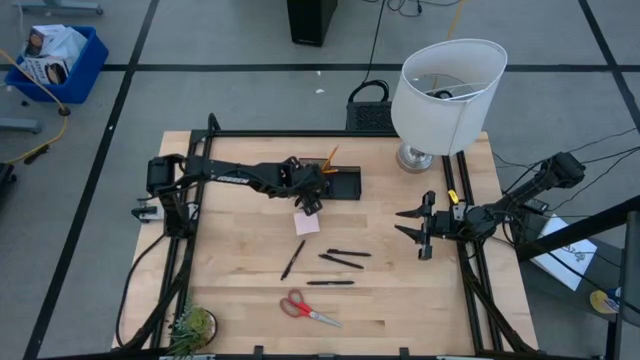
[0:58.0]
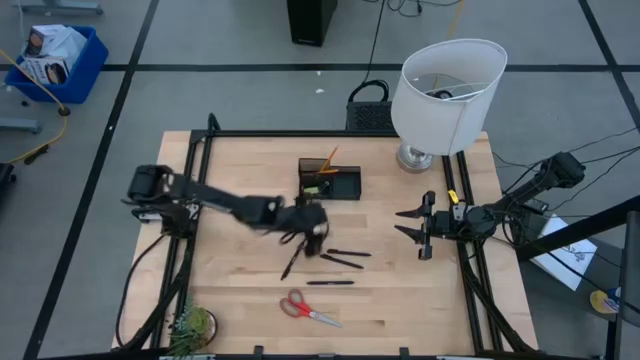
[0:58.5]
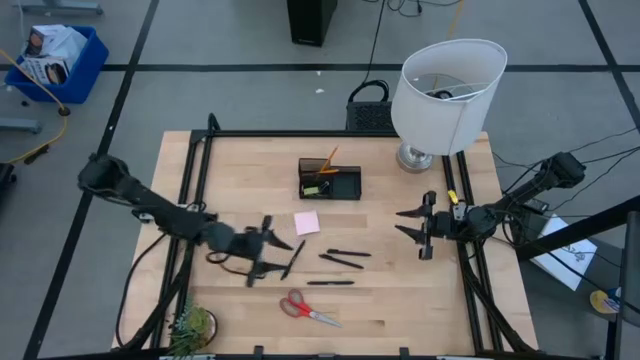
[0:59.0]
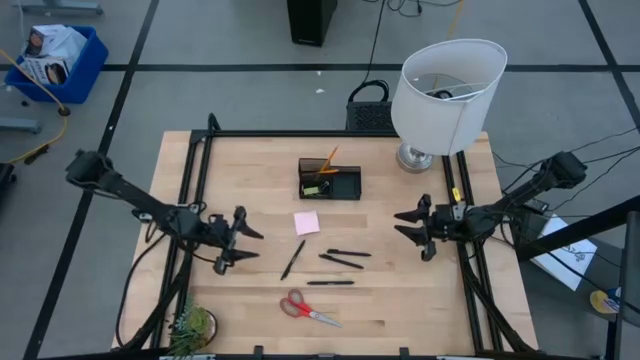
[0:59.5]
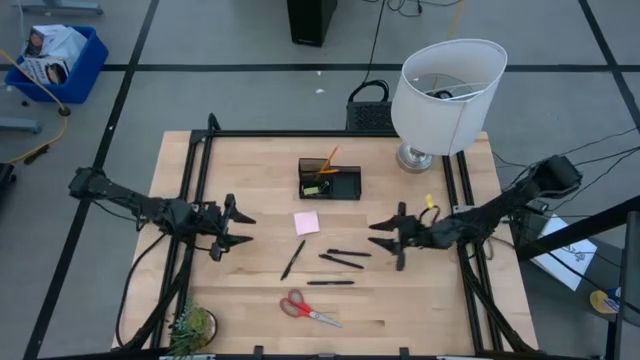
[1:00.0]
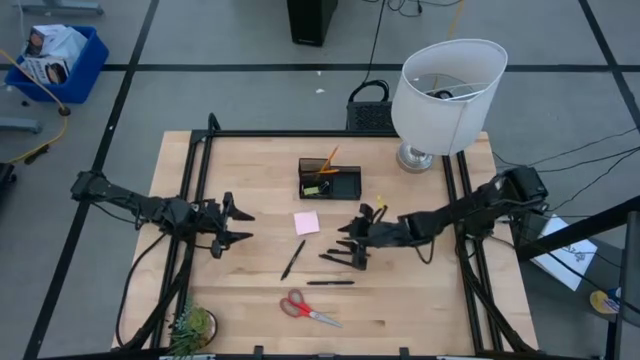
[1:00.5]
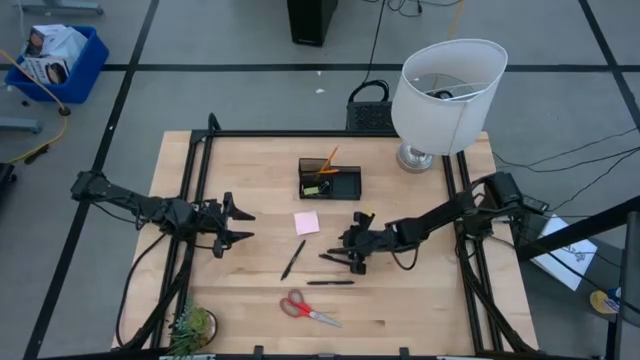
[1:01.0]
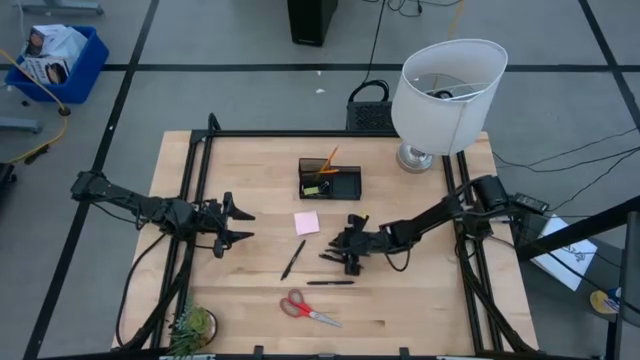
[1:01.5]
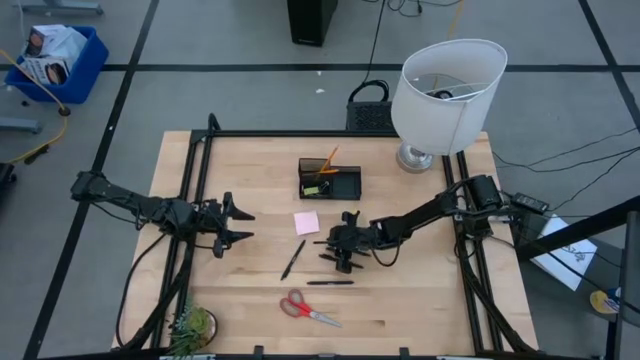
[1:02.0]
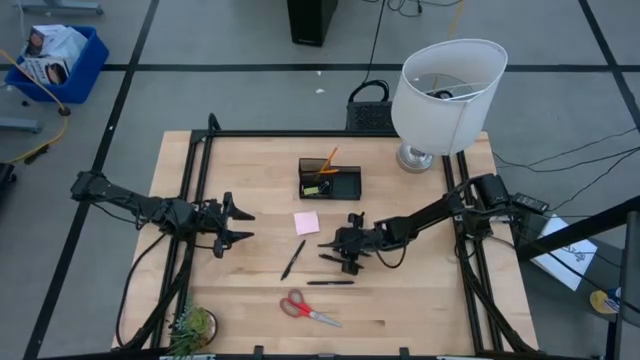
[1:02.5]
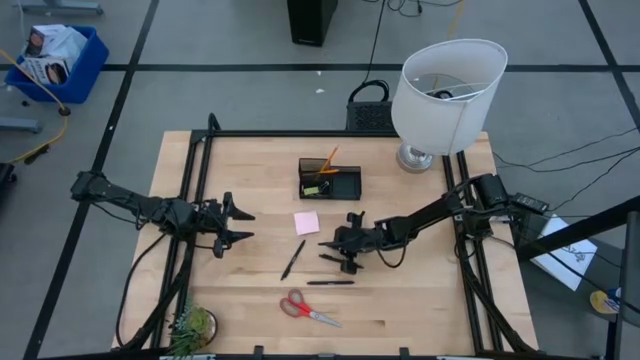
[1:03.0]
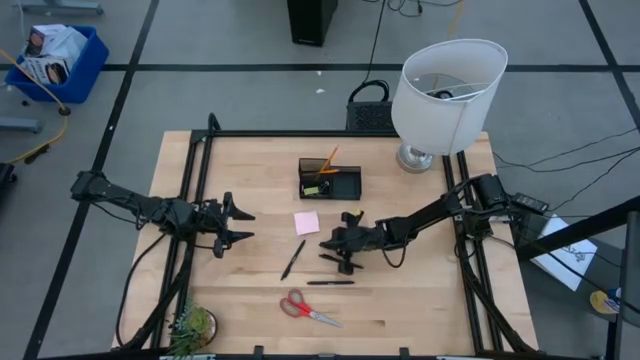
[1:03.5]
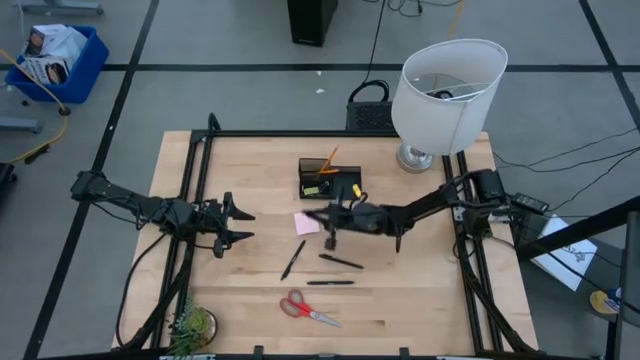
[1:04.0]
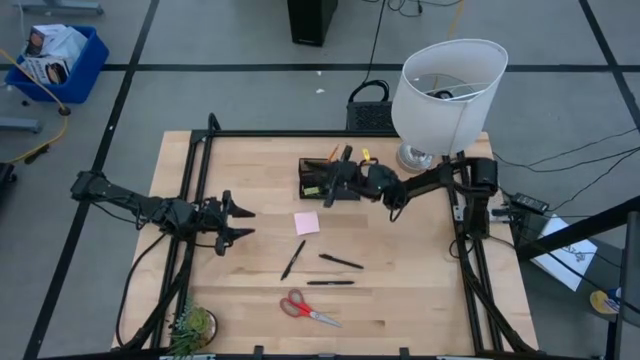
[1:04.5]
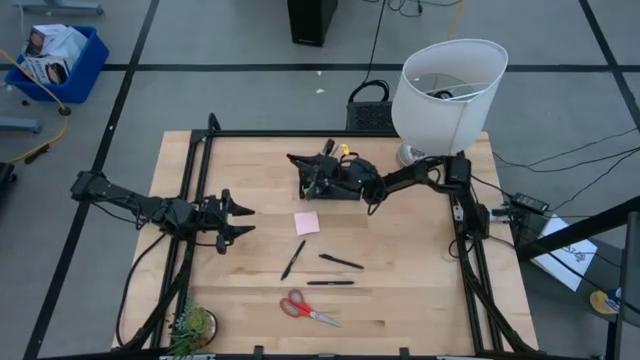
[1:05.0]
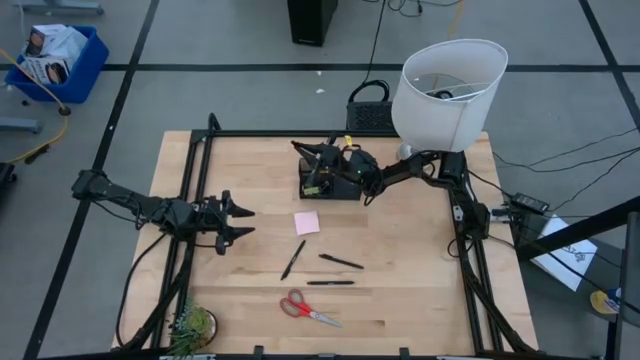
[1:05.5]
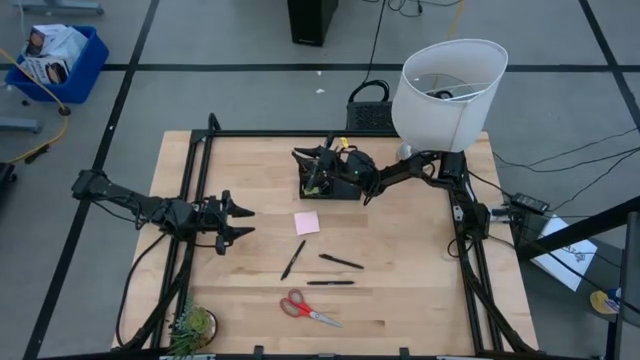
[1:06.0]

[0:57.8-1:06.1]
Task: Pick and place office supplies into organizer
Put the black pen into the desk organizer

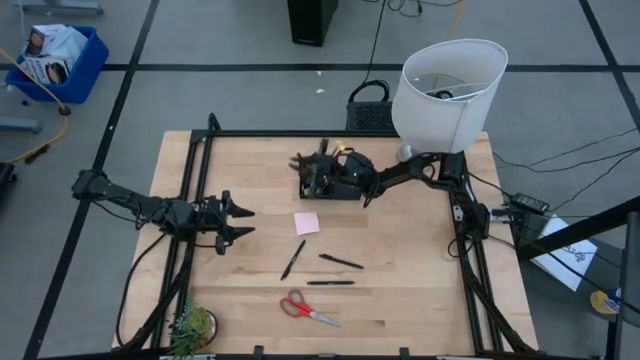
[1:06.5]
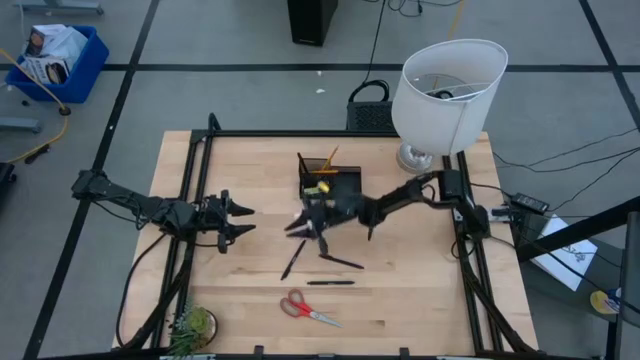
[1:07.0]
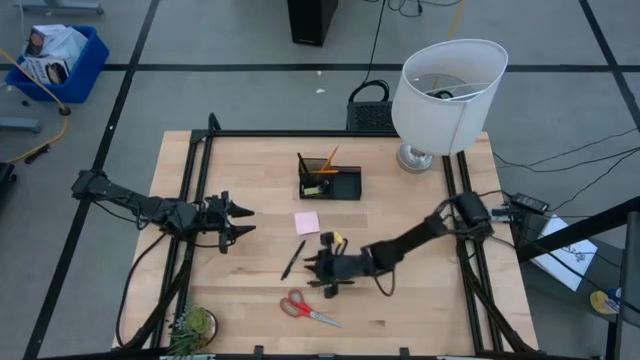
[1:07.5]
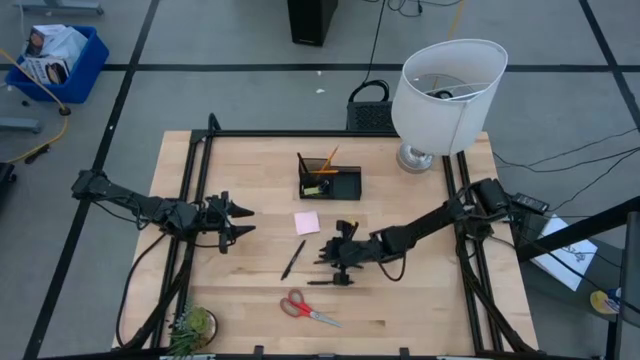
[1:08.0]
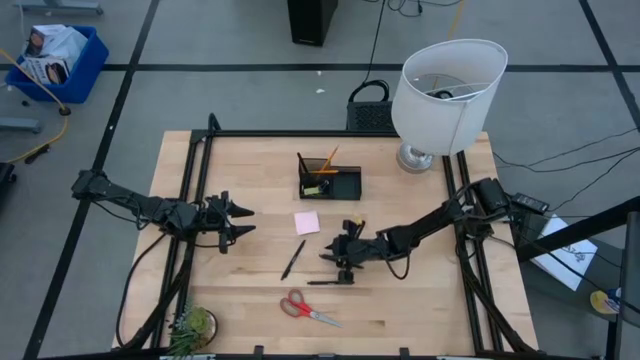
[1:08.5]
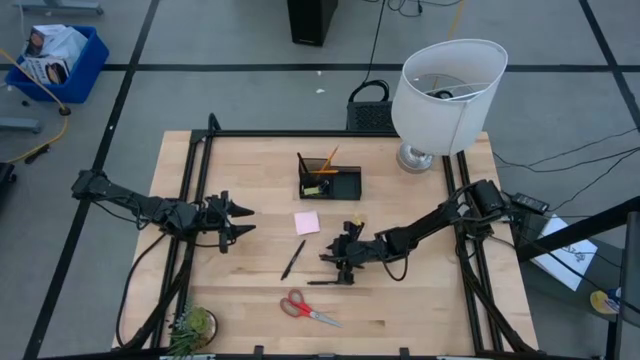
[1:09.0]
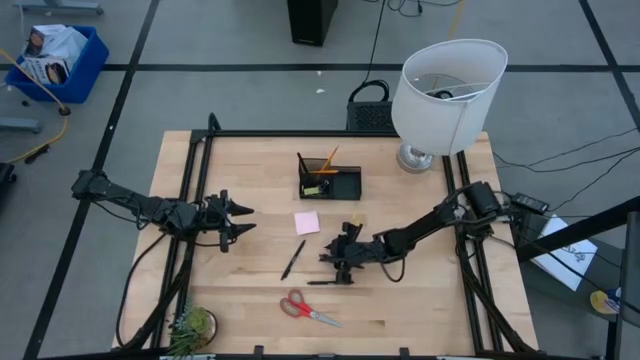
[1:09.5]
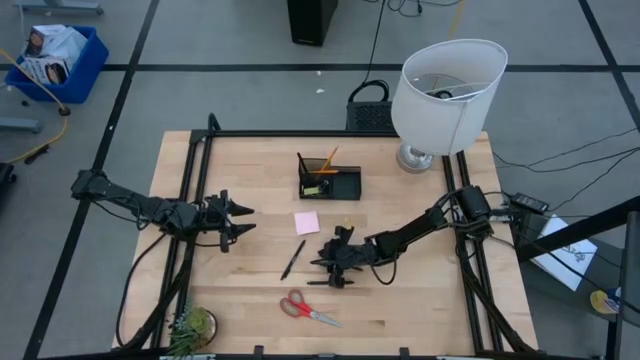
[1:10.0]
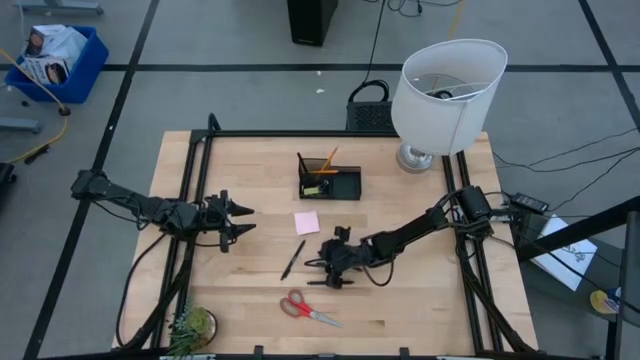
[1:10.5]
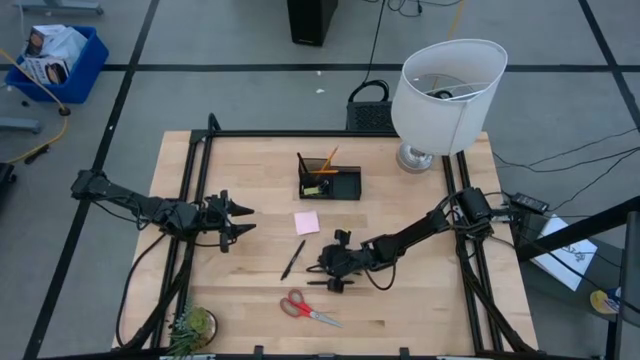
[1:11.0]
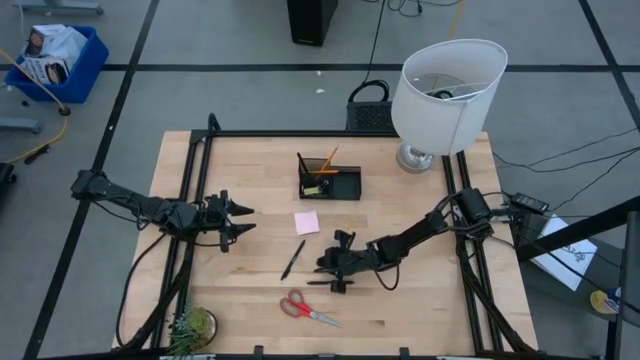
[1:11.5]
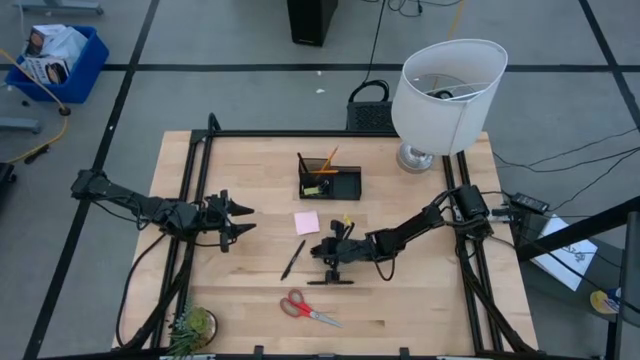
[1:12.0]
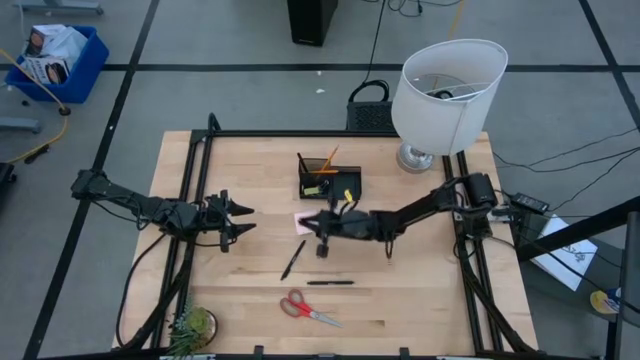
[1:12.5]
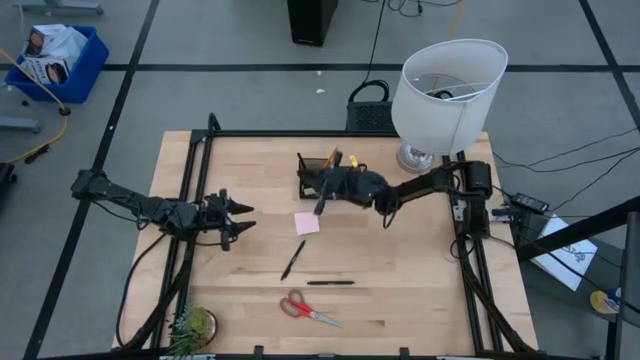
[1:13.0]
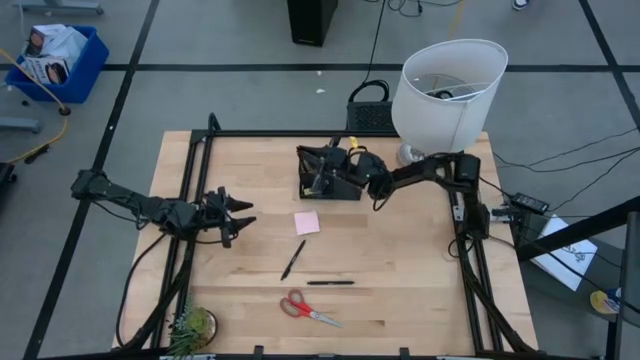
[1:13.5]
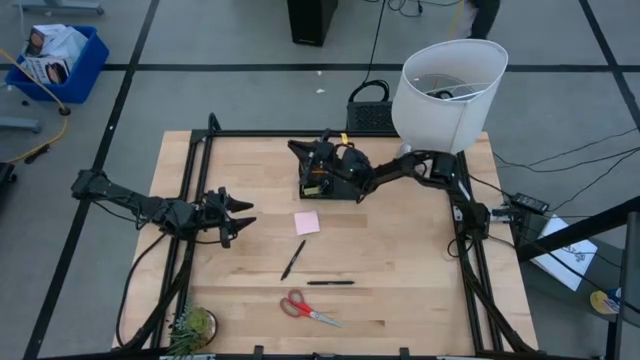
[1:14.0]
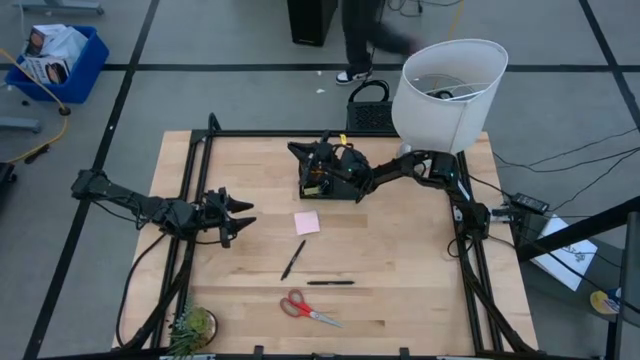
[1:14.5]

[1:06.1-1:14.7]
Put the black pen into the desk organizer

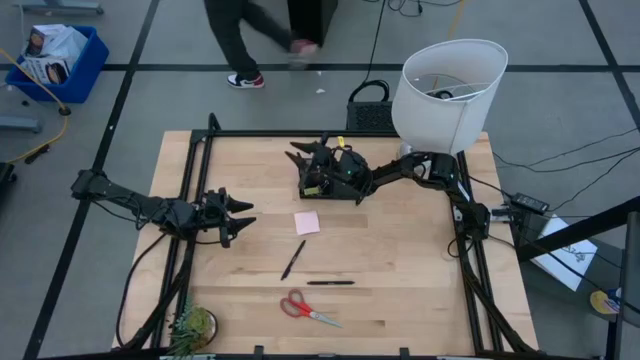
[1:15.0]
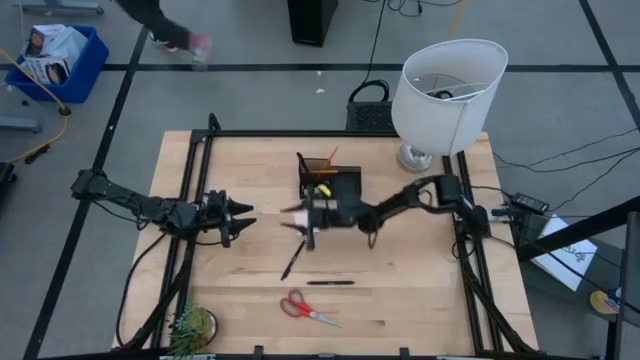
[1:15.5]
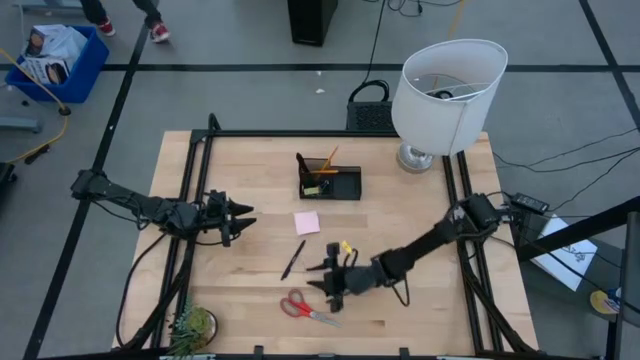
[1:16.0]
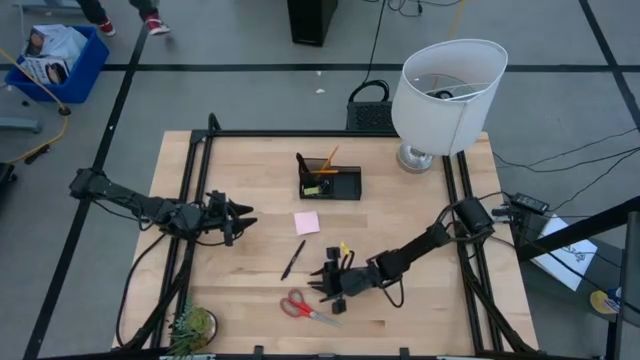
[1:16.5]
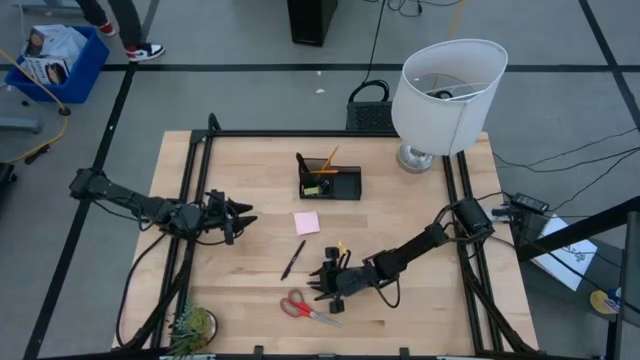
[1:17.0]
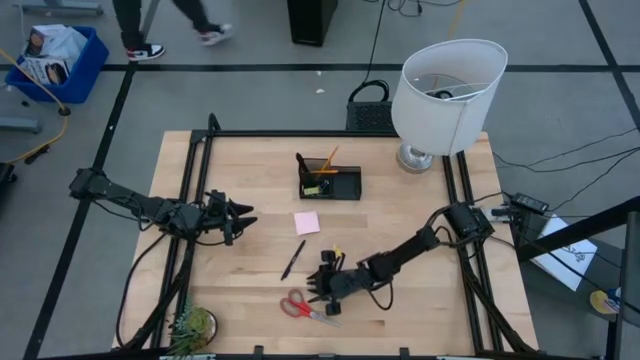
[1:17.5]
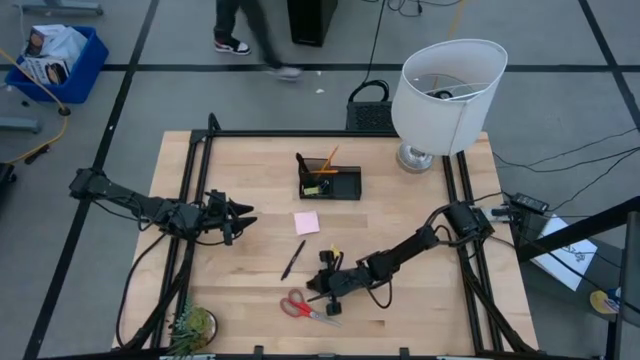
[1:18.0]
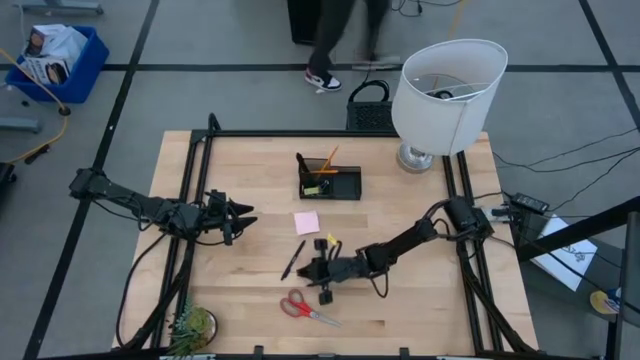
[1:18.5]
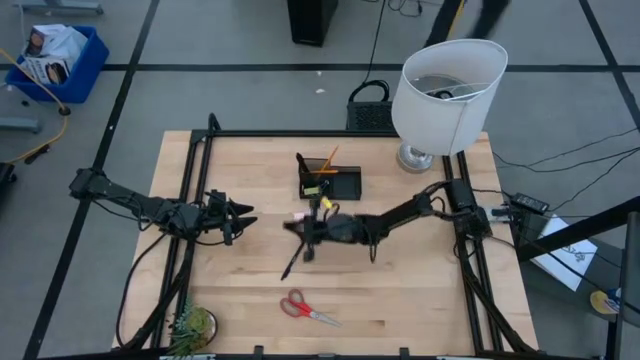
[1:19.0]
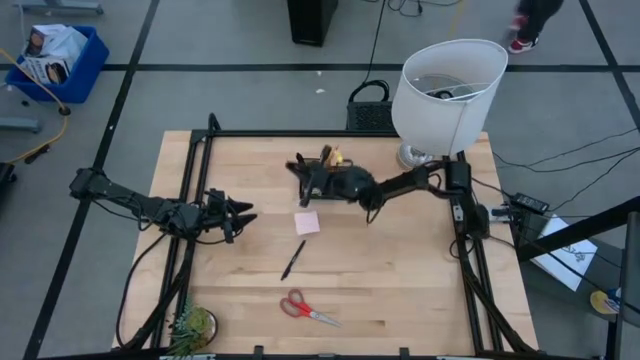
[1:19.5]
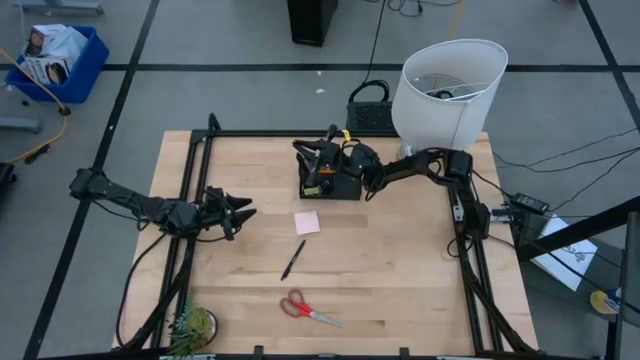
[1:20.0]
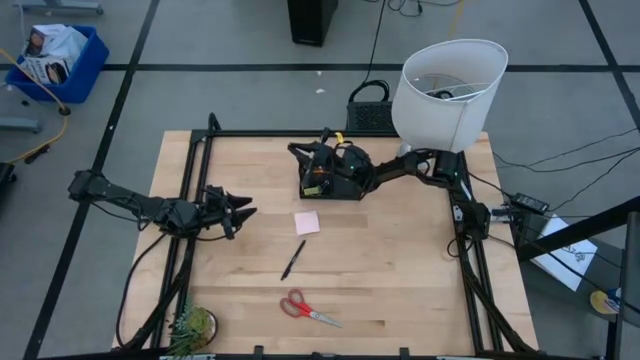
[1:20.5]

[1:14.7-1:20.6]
Put the black pen into the desk organizer
